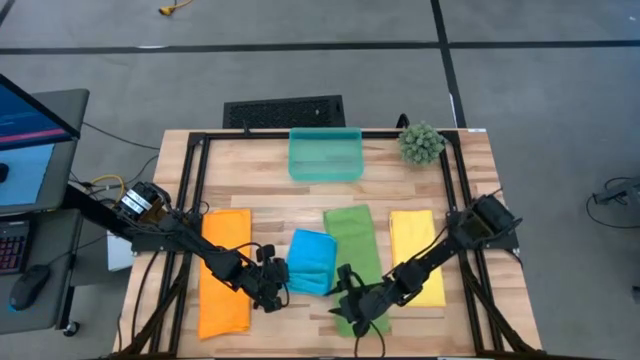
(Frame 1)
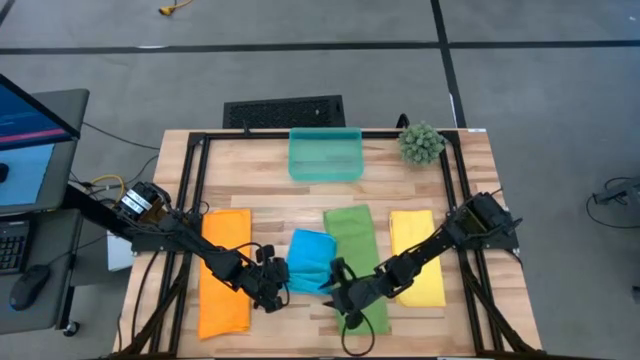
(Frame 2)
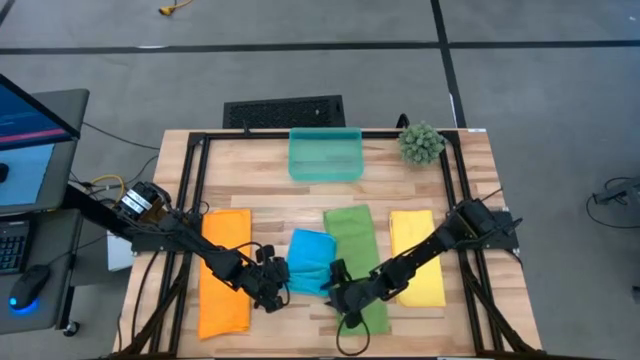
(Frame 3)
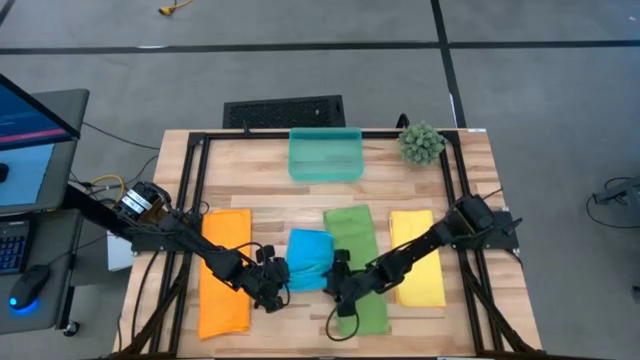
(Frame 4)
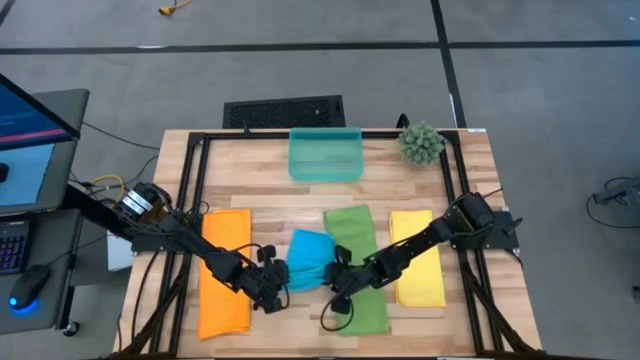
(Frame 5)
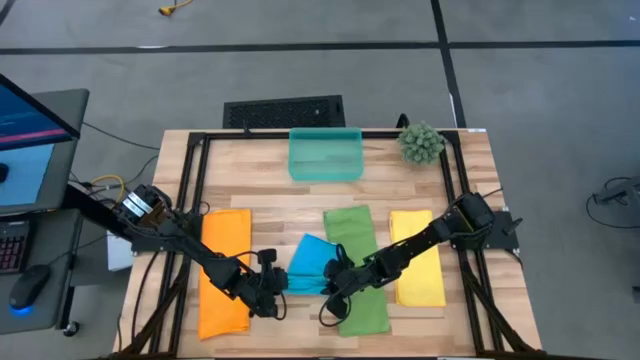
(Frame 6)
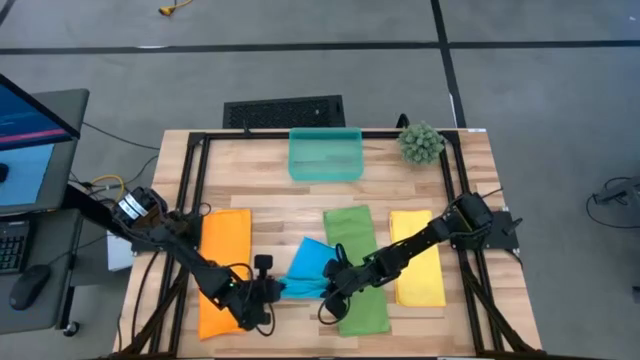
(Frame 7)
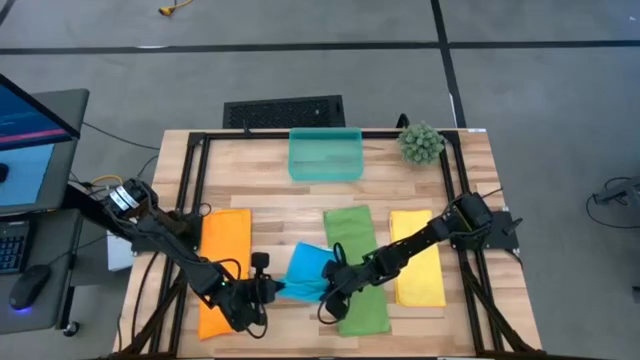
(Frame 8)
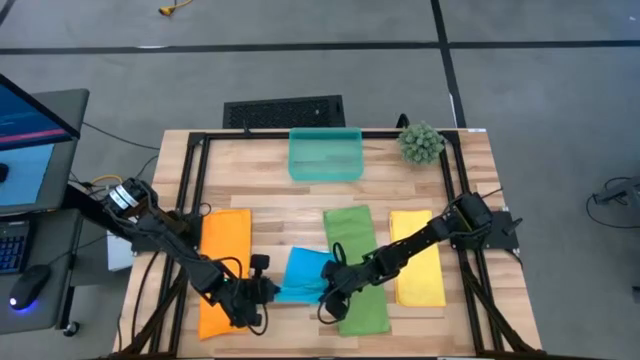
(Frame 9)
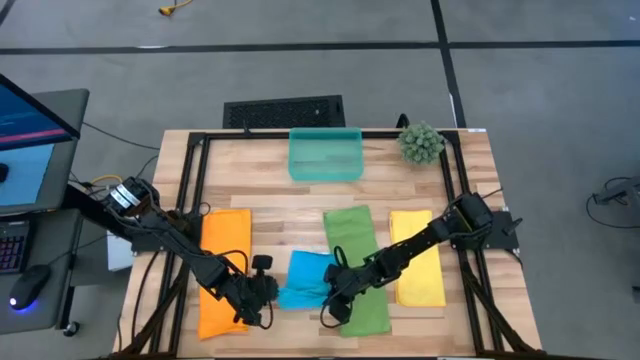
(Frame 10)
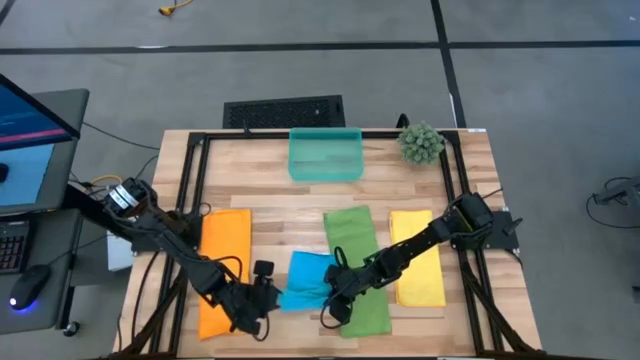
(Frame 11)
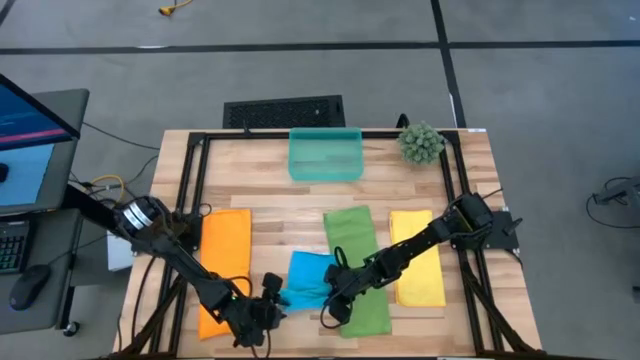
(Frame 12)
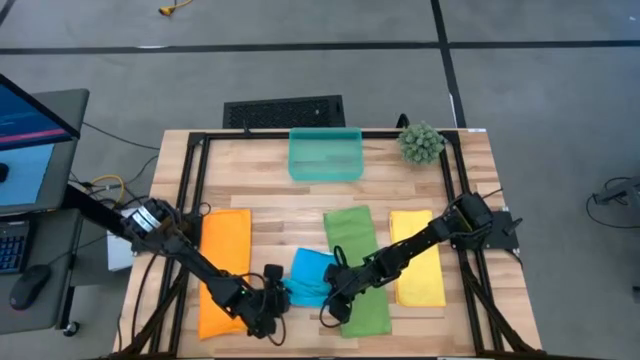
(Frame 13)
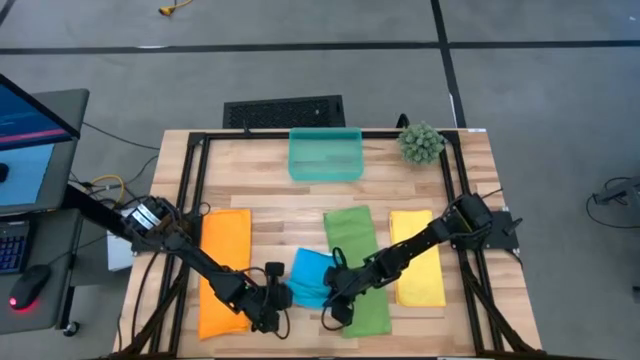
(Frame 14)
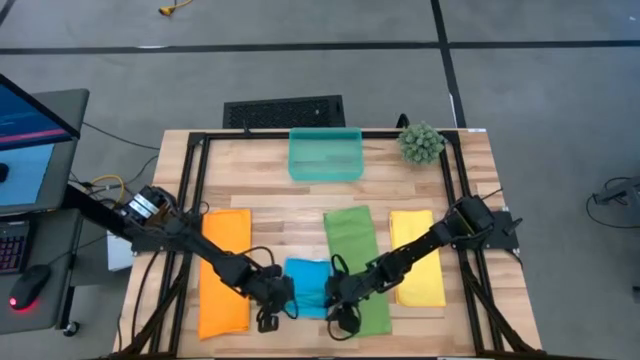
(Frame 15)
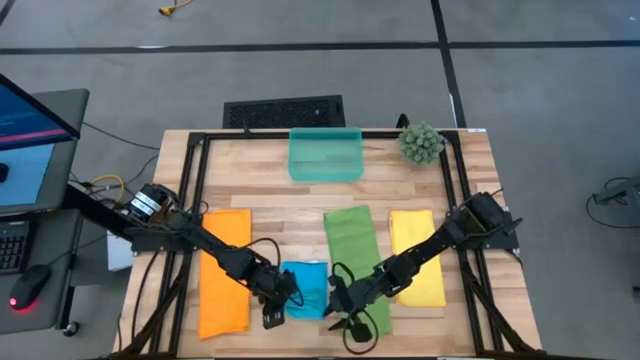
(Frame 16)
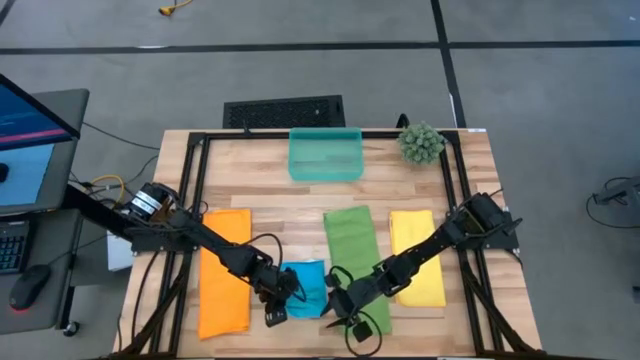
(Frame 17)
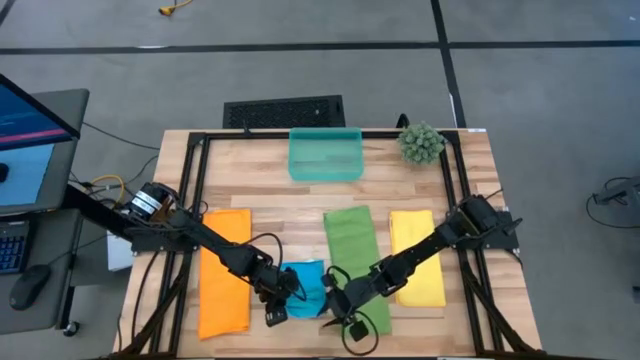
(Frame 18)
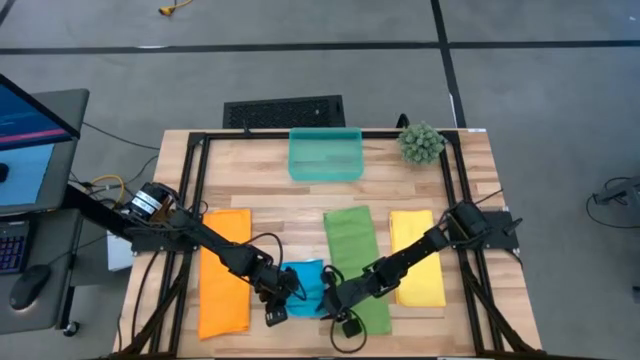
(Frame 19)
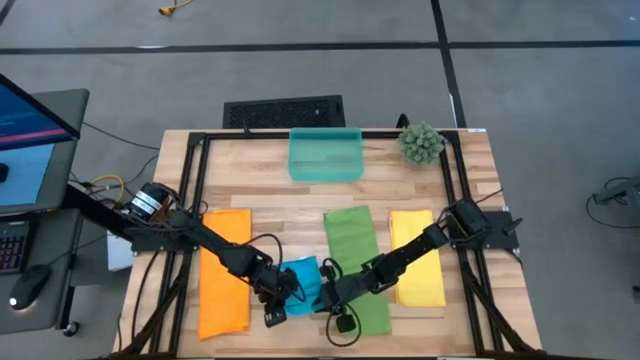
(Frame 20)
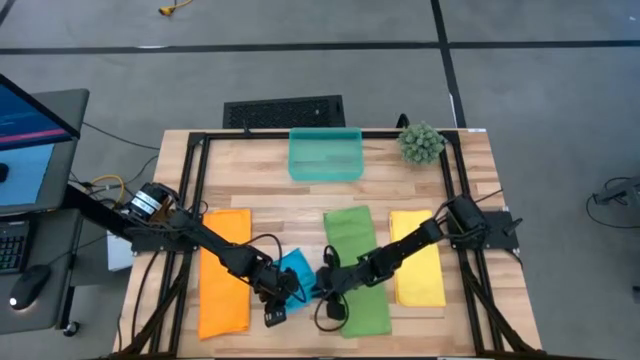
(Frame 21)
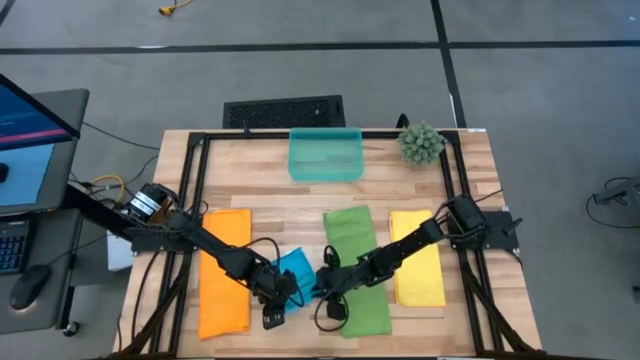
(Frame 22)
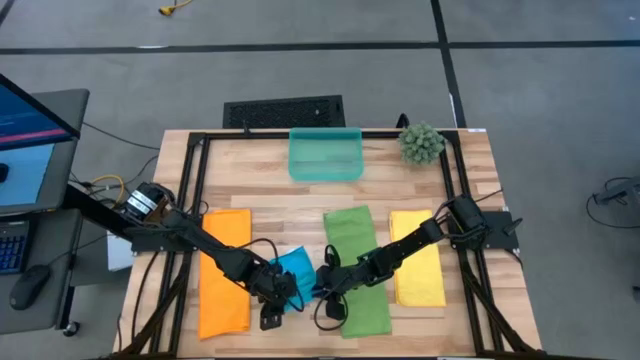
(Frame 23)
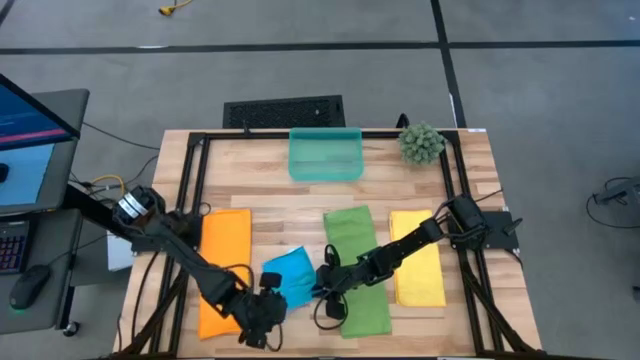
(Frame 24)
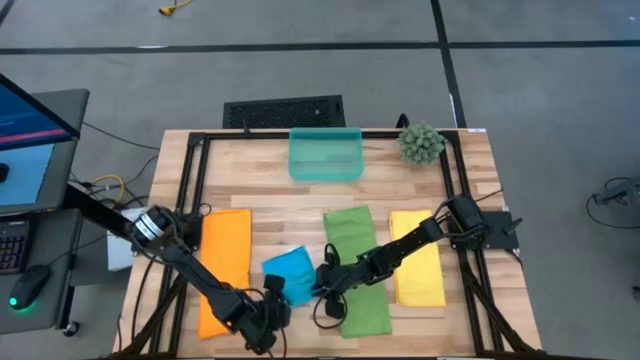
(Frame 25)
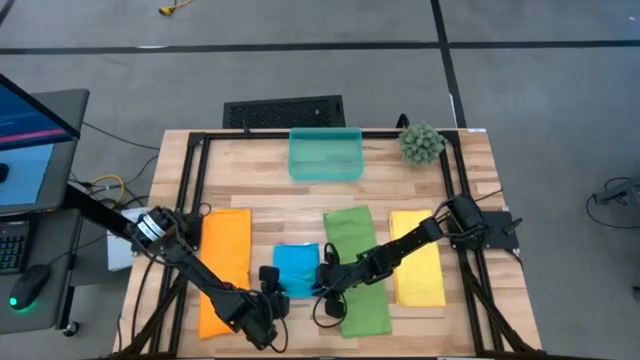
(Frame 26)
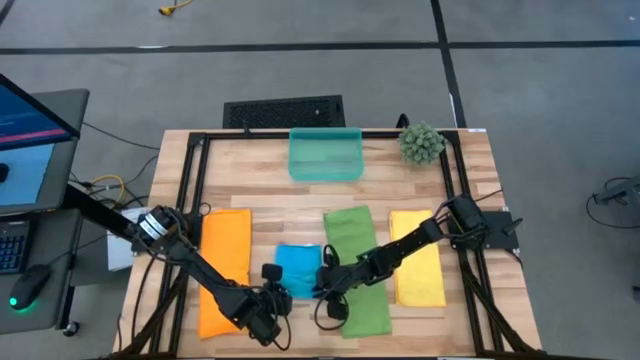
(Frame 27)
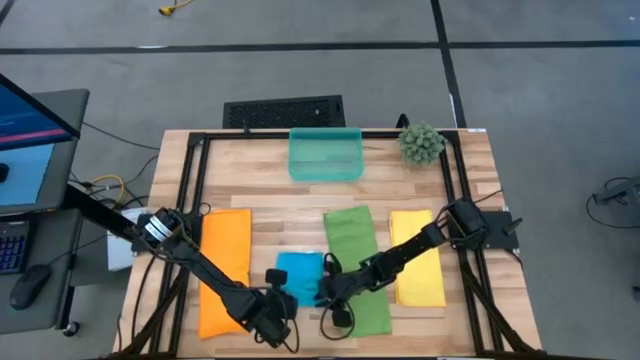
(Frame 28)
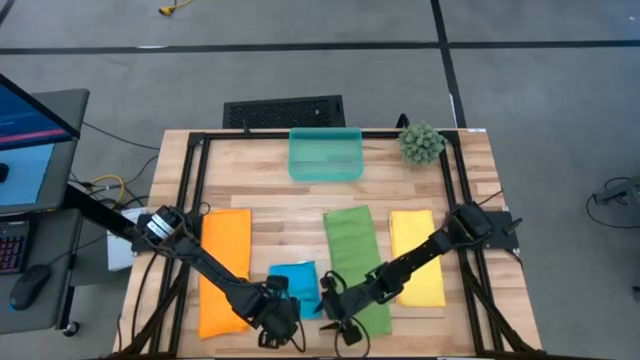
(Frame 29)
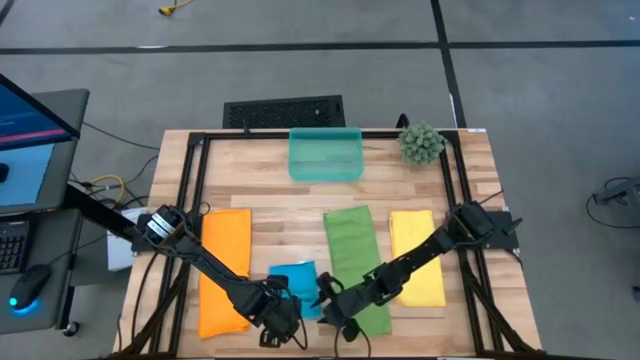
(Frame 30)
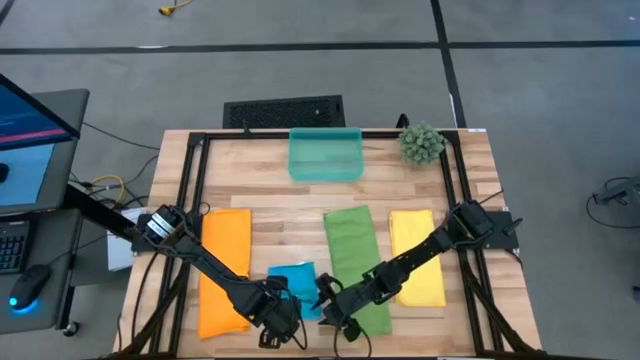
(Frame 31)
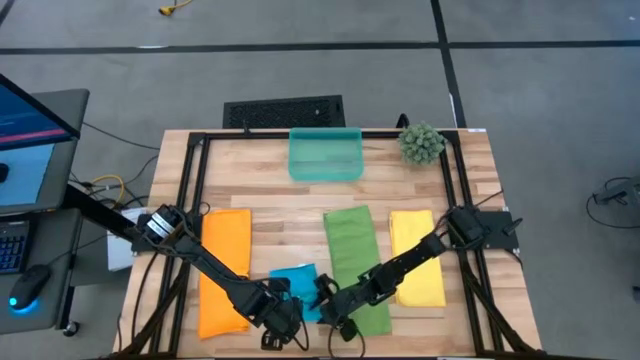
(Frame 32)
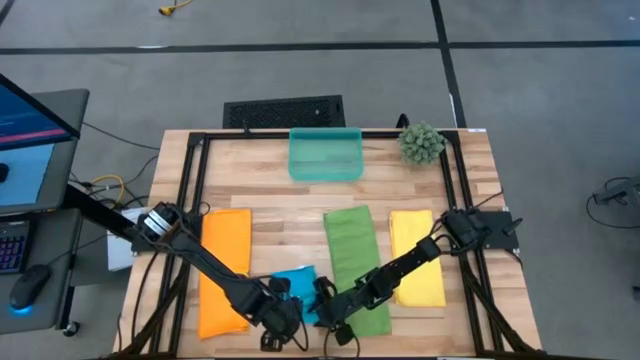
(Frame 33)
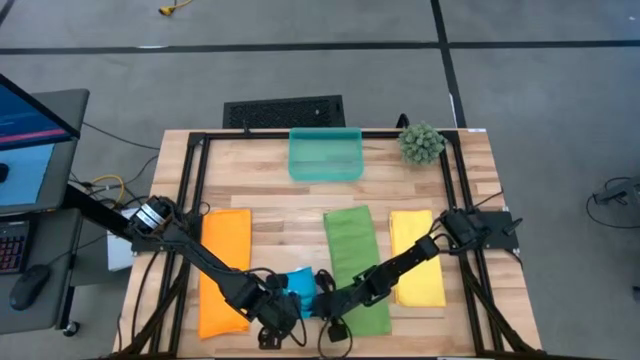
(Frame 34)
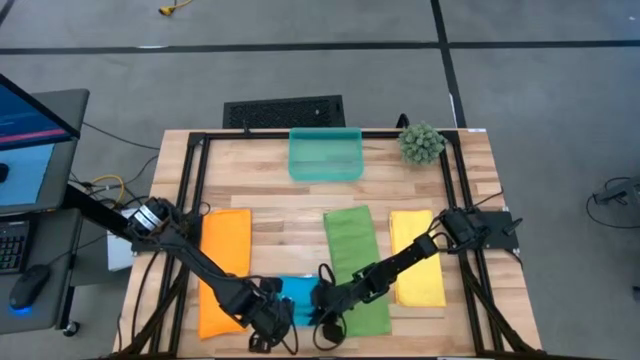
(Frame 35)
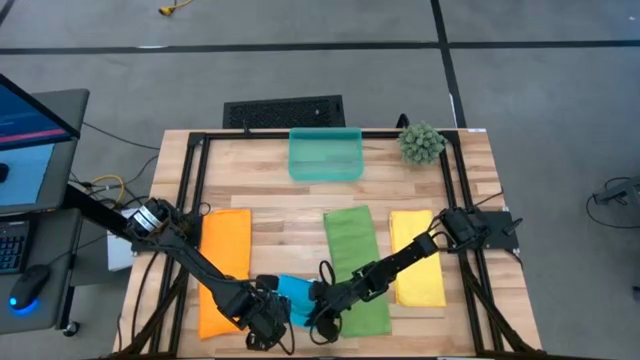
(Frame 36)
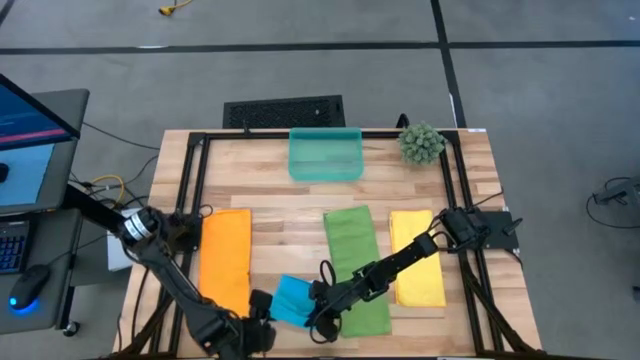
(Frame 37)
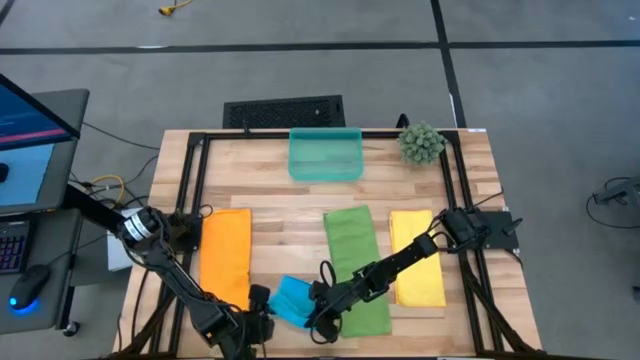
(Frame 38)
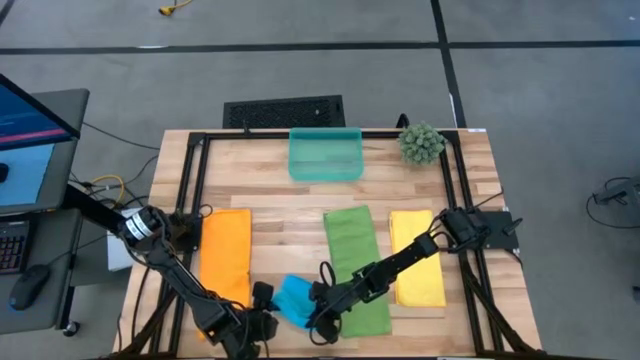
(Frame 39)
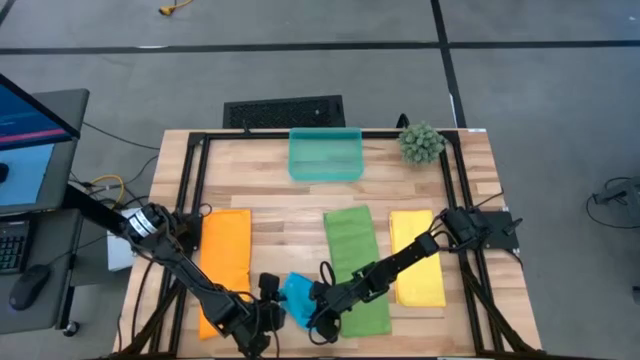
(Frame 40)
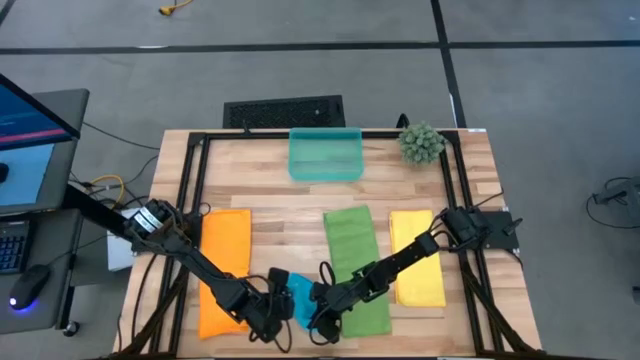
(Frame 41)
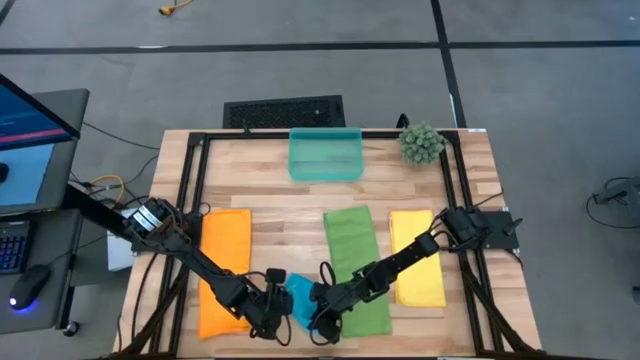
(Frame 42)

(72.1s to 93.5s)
Task: Roll microfiber towels into tight, uniform cylinder then place into a basket
Roll the blue towel

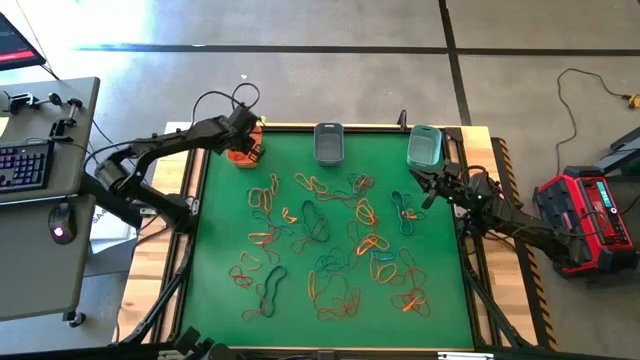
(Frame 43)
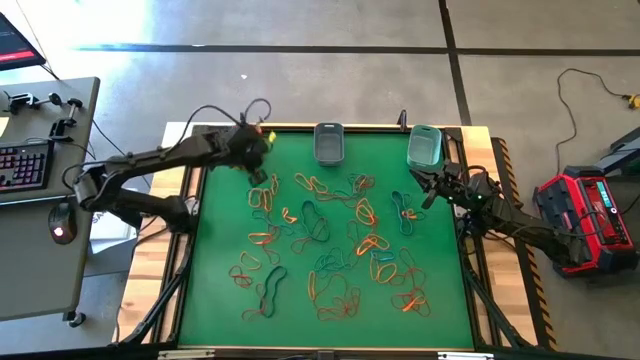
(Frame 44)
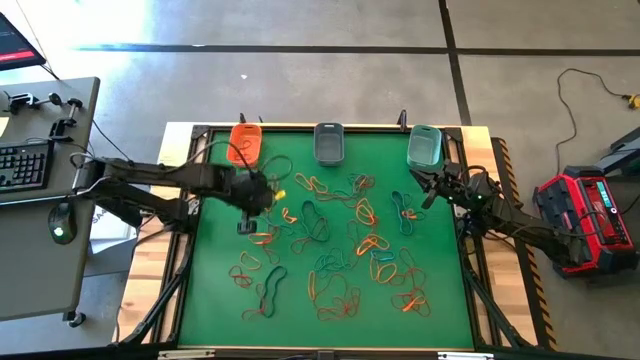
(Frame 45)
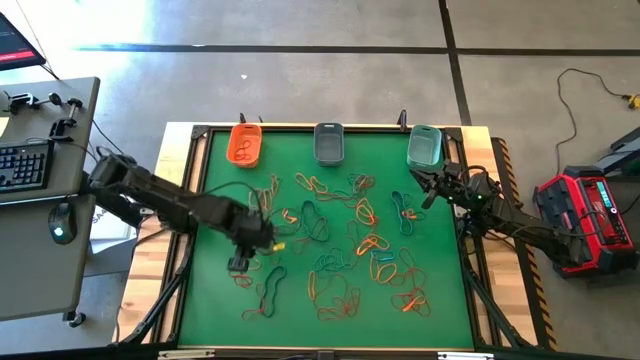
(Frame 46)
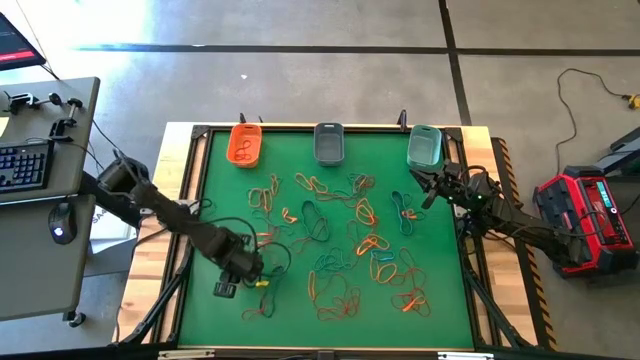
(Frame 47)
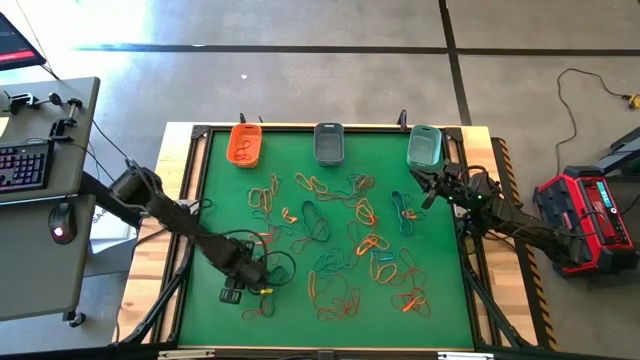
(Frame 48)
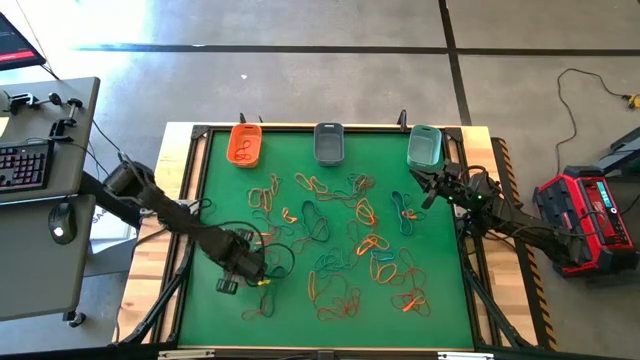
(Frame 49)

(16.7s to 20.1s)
Task: Sort rubber bands into baskets
Put the red rubber band into the orange bin
